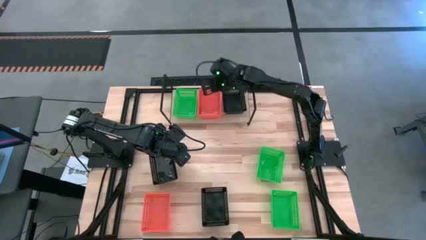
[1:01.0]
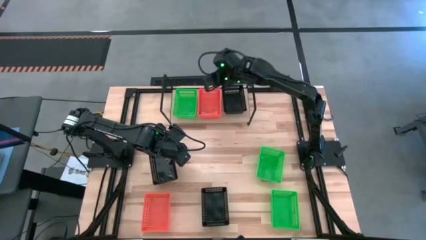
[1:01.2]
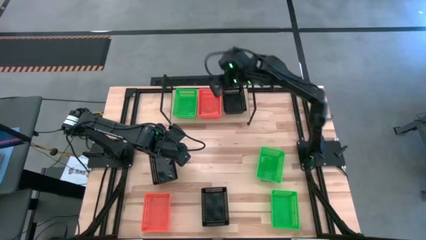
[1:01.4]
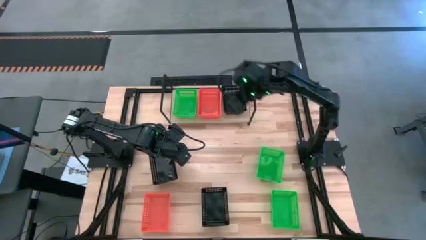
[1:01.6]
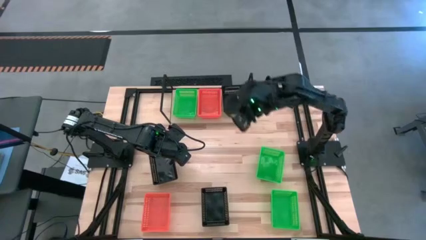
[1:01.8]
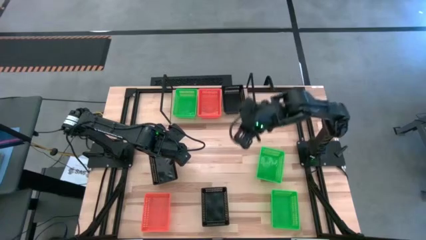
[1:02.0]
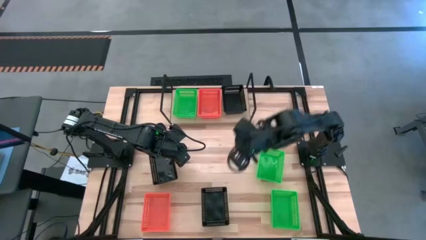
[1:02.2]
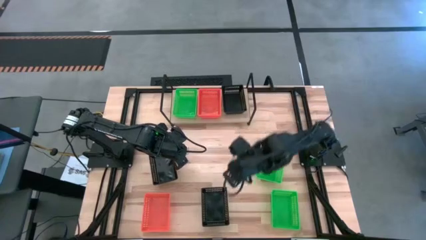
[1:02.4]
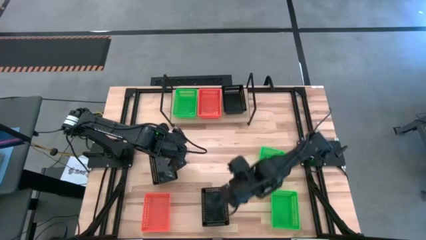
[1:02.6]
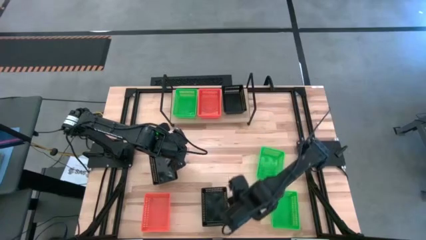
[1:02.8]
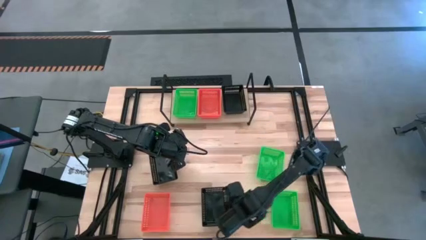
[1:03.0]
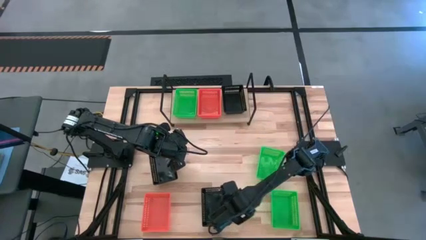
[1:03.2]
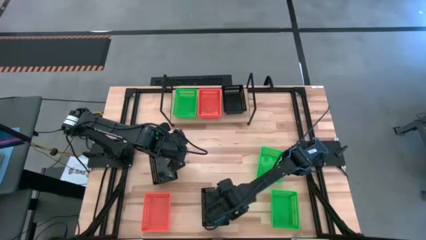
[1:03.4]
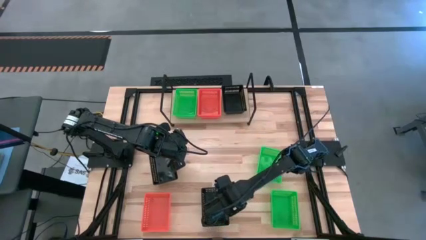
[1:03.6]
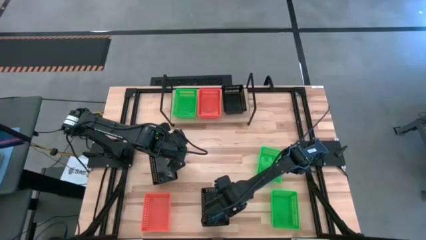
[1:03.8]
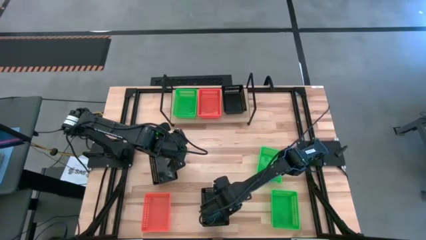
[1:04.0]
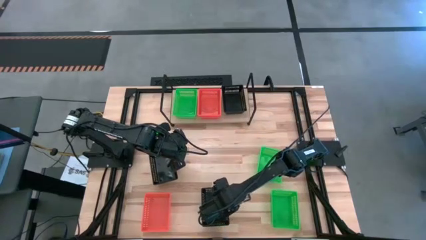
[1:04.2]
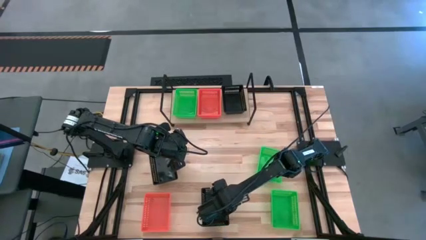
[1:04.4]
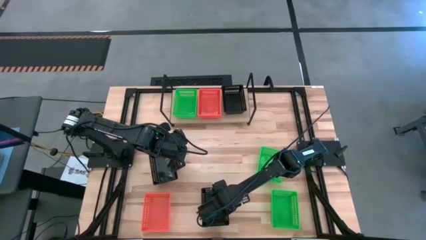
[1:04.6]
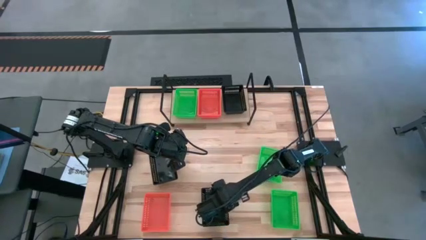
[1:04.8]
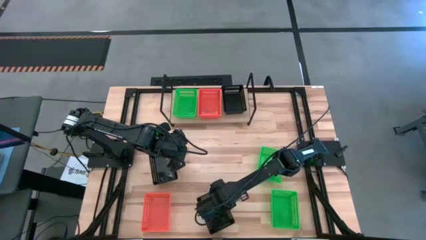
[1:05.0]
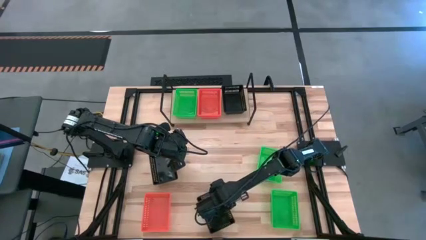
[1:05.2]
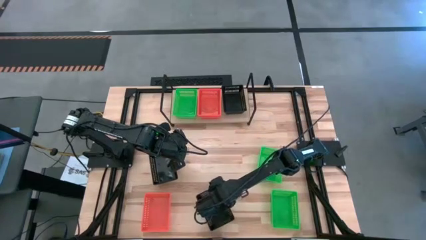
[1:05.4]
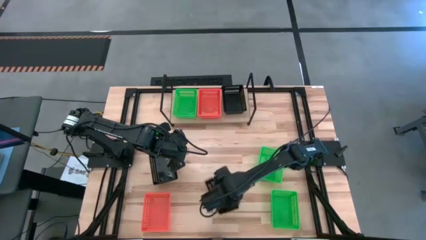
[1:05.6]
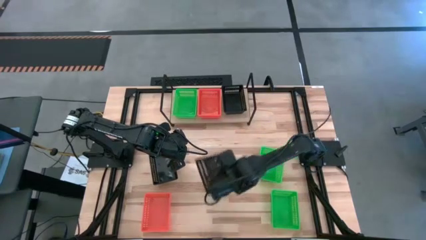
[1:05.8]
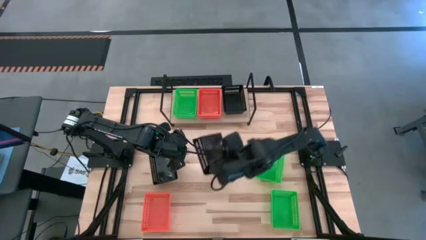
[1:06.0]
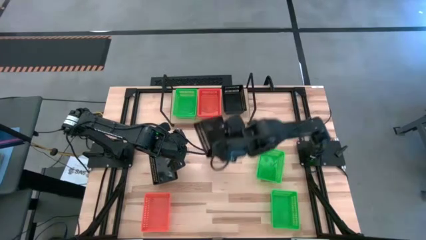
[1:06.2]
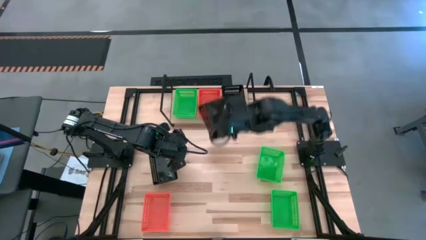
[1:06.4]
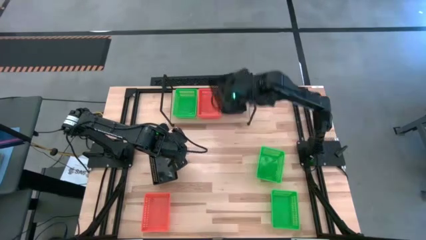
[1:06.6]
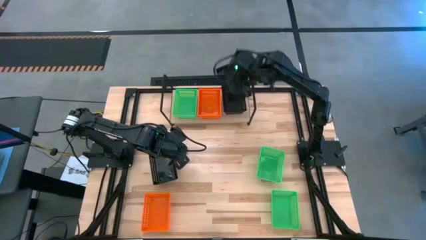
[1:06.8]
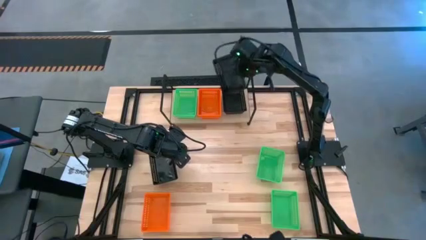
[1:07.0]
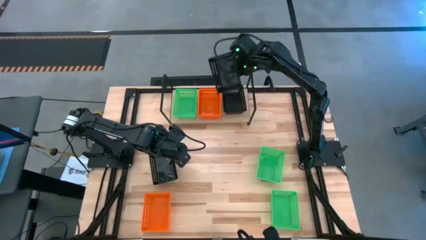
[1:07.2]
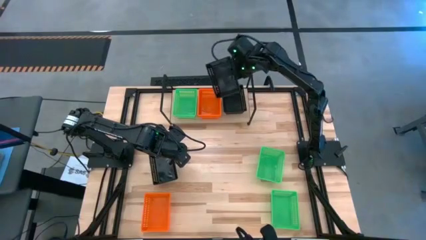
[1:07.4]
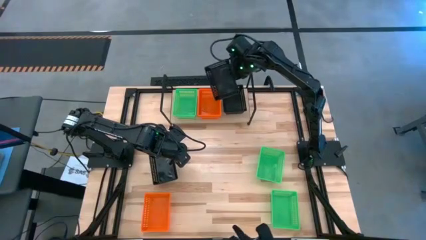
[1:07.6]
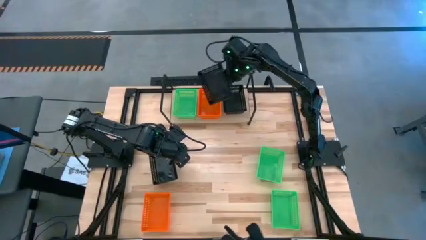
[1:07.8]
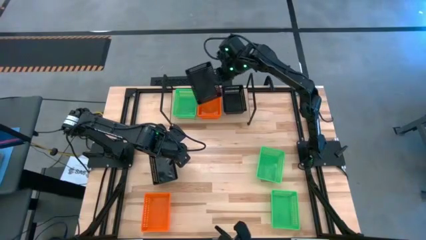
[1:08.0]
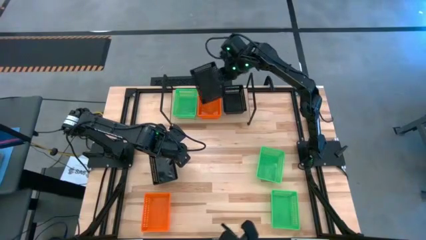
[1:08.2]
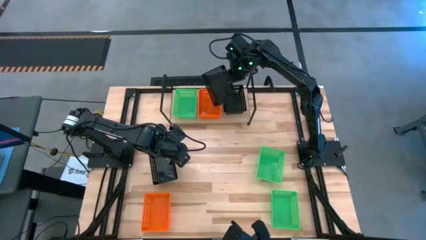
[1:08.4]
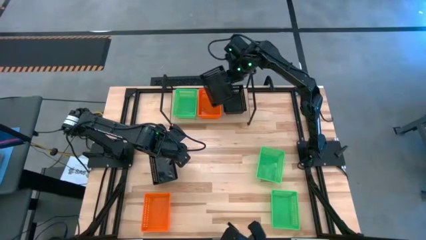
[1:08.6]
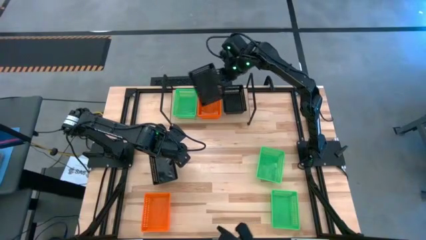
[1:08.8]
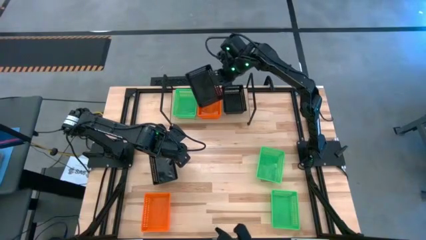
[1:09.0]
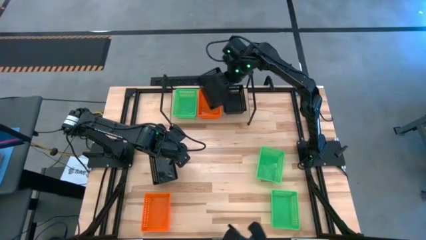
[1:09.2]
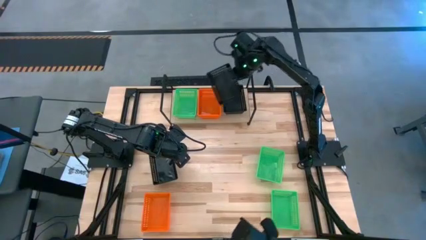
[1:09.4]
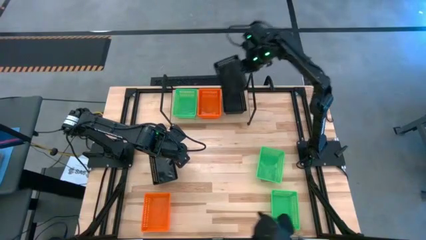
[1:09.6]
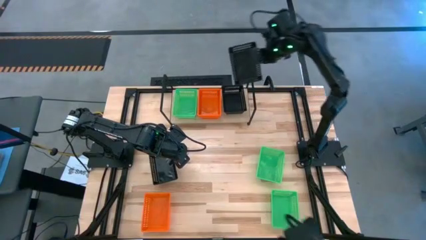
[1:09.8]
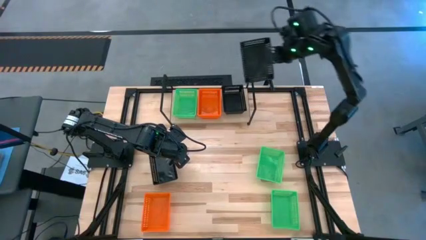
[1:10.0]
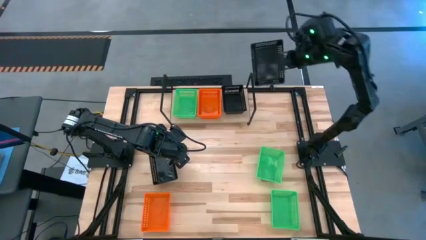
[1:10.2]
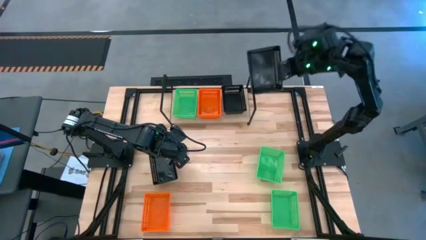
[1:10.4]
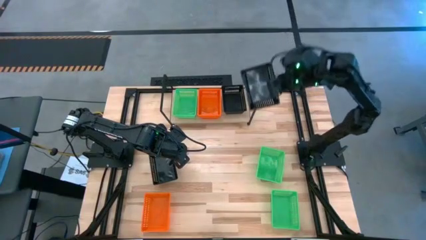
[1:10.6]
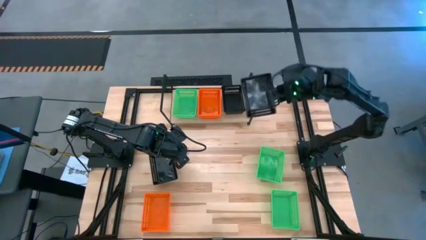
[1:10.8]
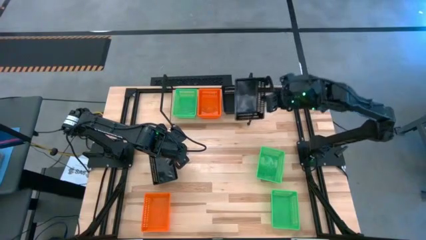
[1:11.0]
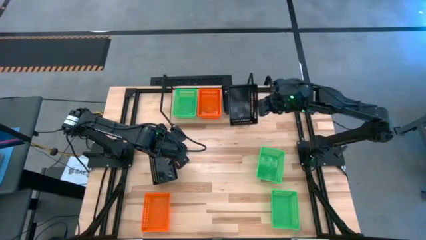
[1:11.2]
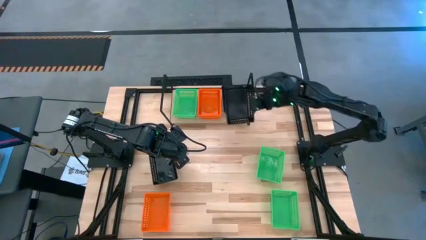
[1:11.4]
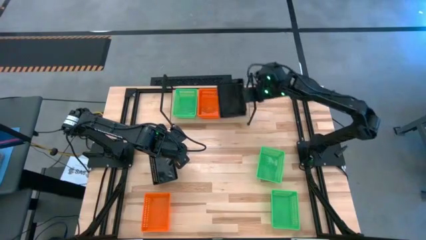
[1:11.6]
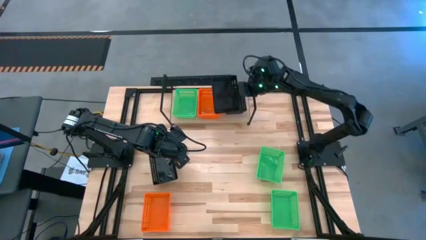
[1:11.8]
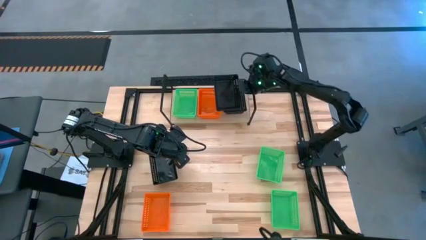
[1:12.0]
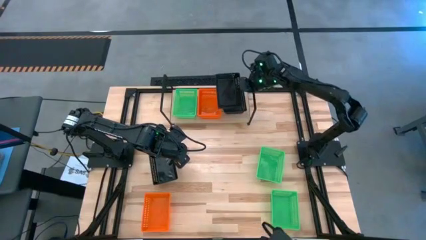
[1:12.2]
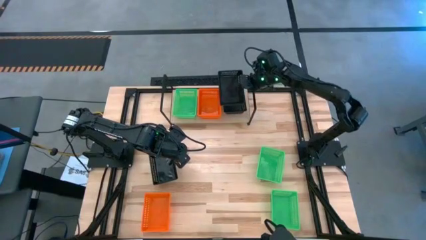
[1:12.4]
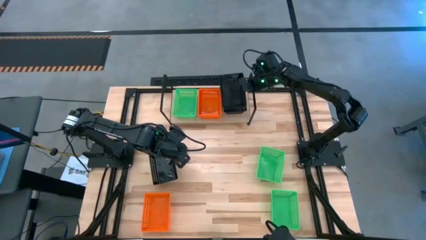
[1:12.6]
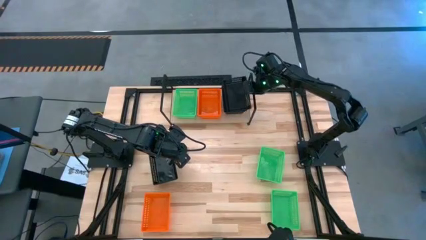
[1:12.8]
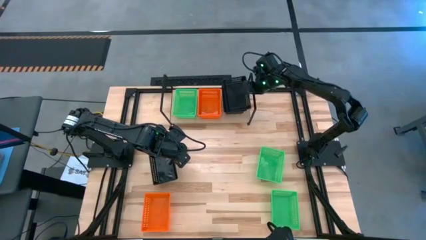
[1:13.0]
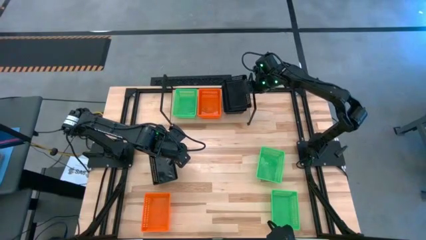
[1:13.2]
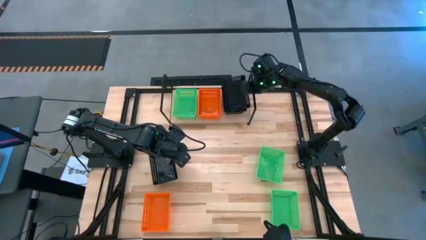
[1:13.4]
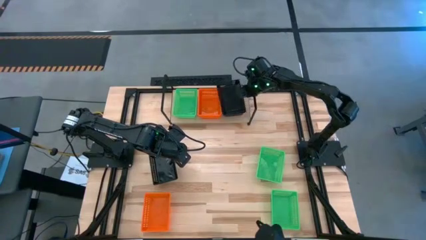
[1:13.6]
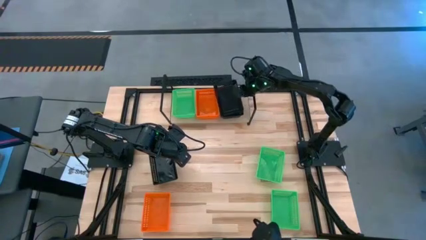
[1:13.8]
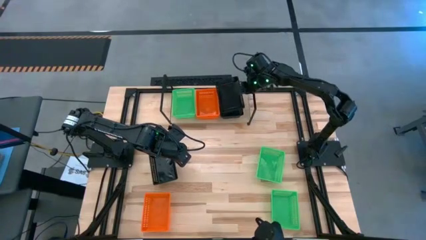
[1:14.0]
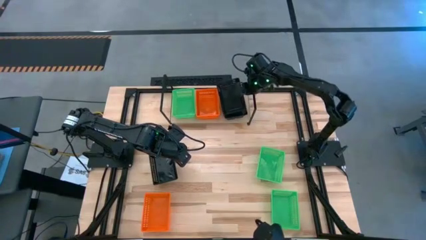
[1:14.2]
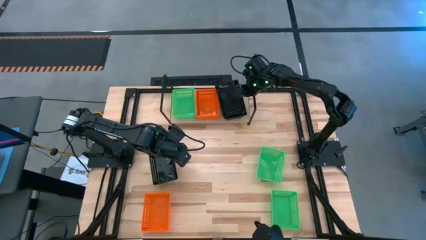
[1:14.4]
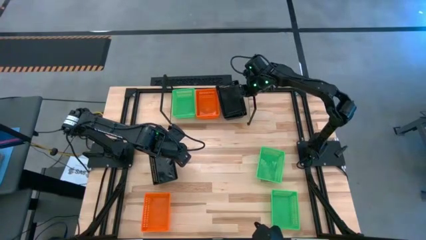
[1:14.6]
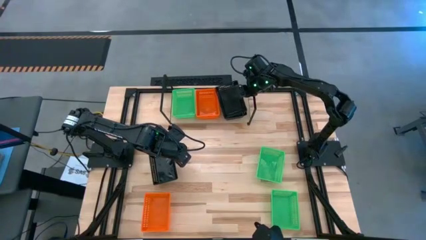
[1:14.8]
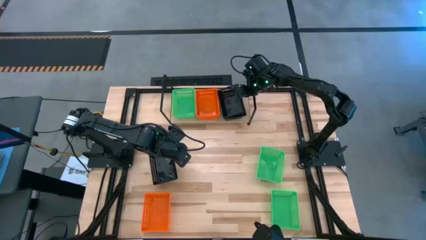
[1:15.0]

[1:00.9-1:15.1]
Task: Stack baskets on shelf by color
Stack the bottom black bin on top of the black bin on the shelf
